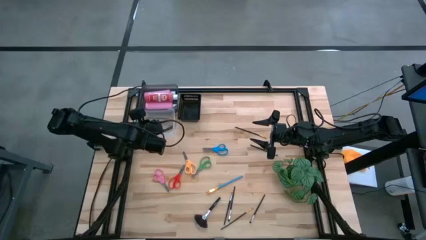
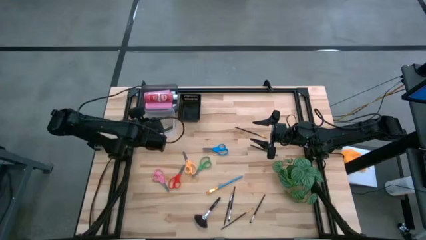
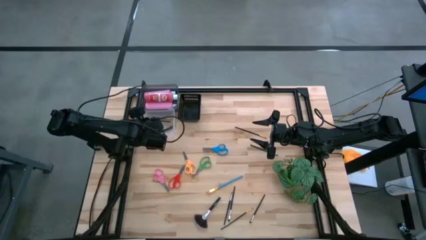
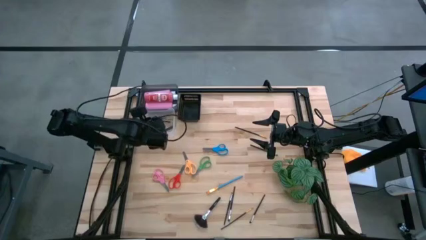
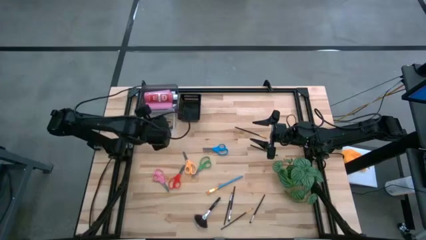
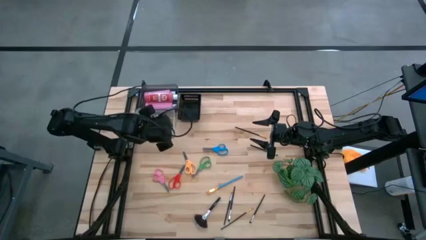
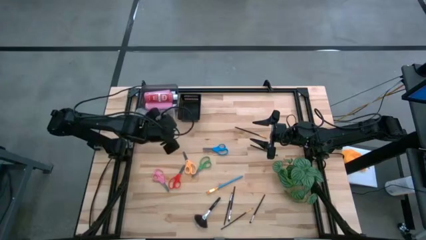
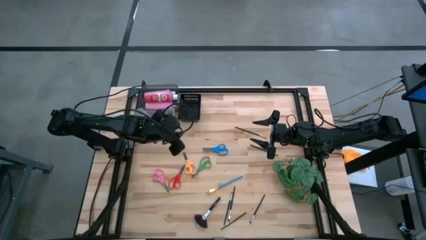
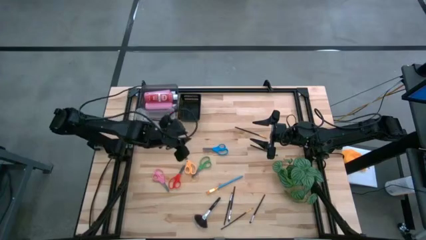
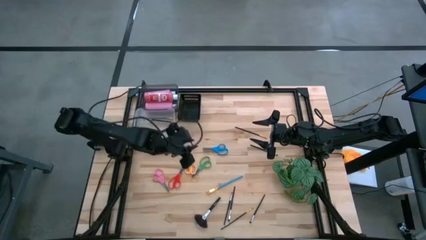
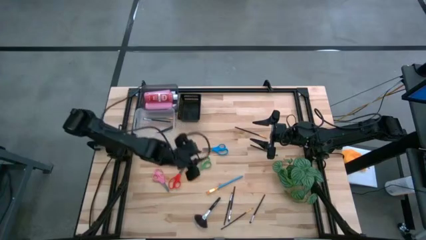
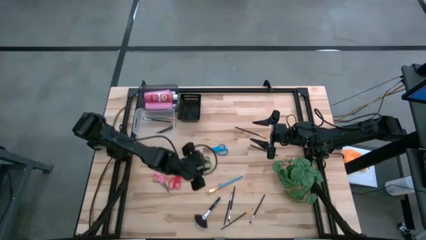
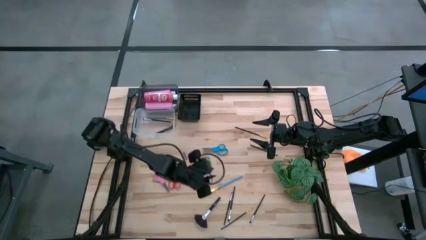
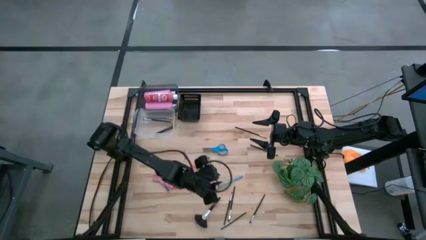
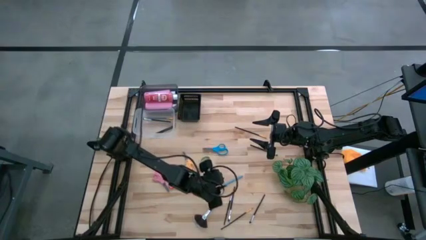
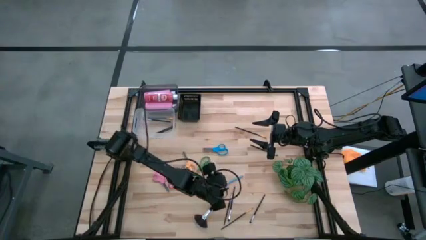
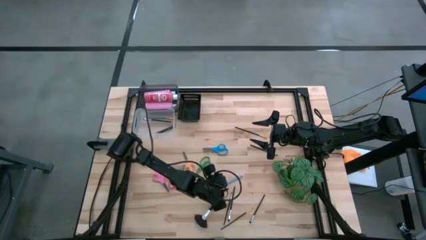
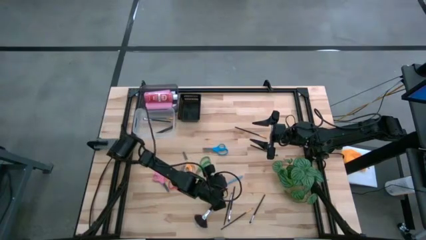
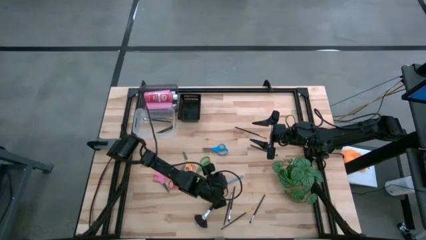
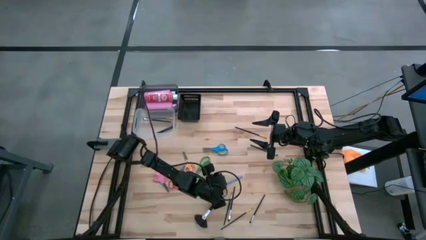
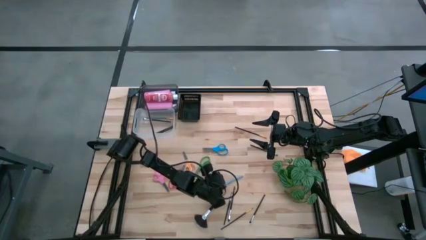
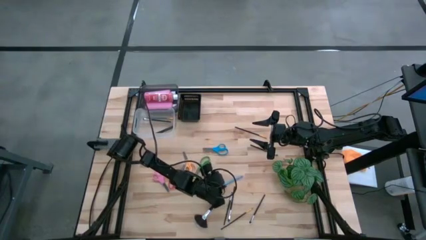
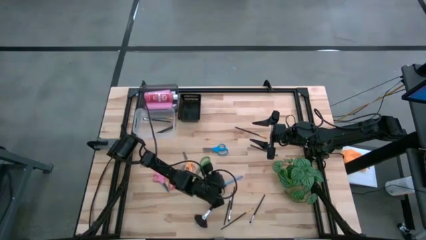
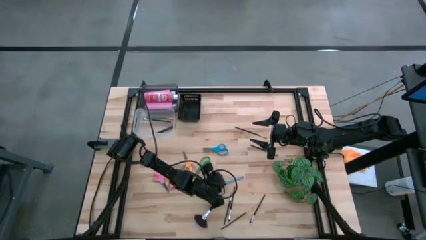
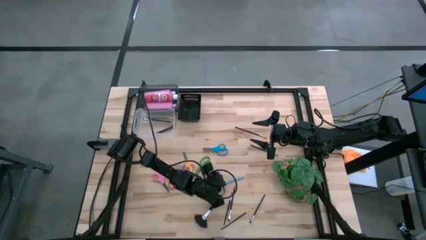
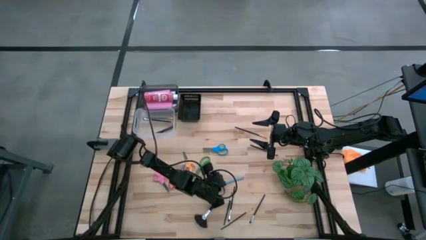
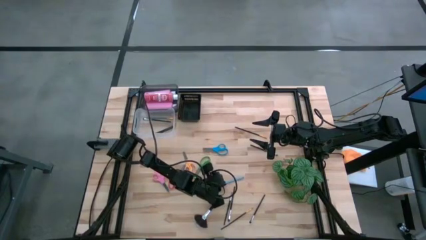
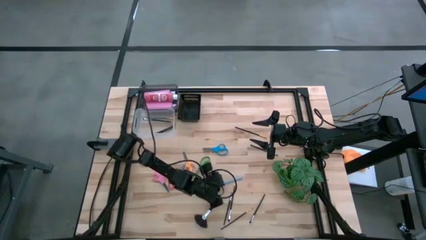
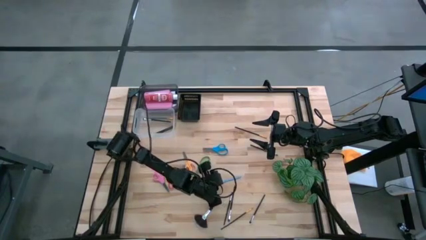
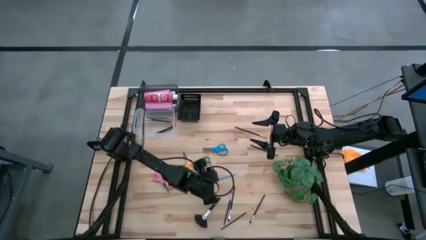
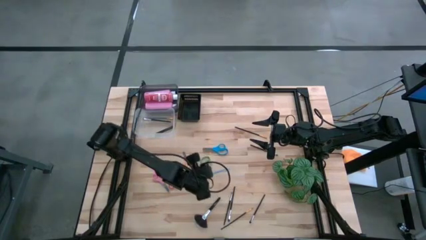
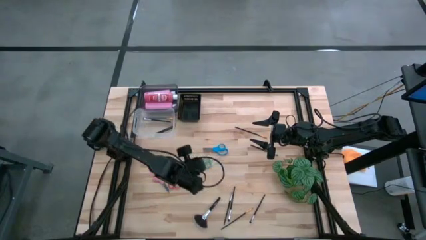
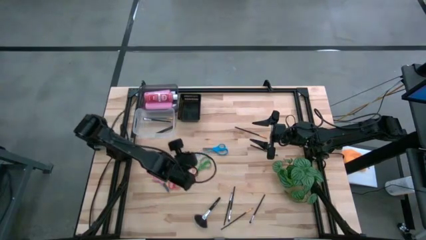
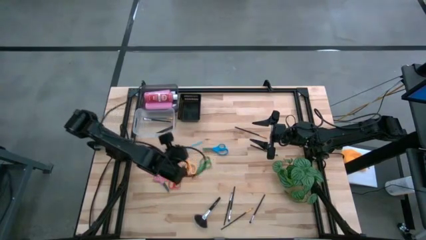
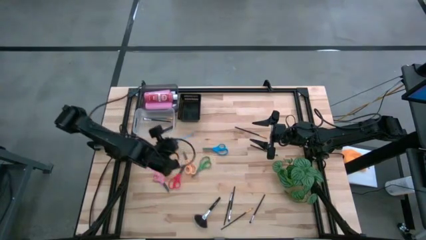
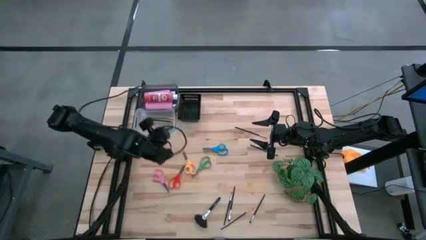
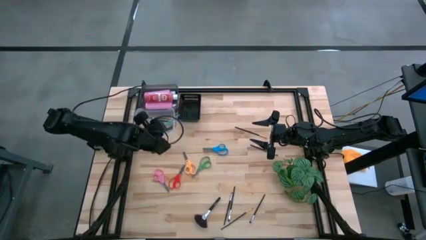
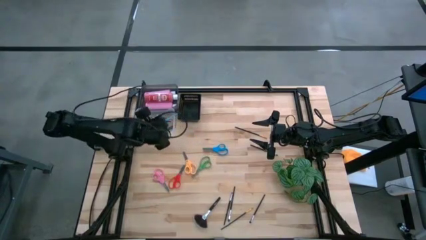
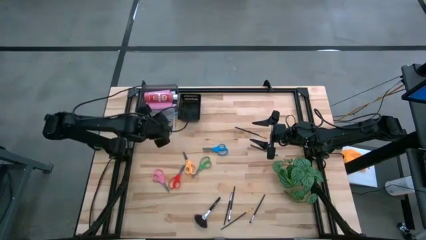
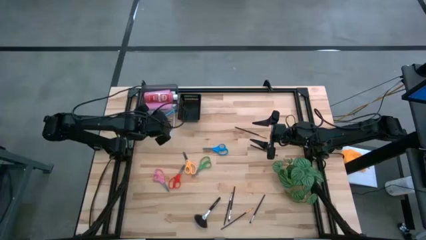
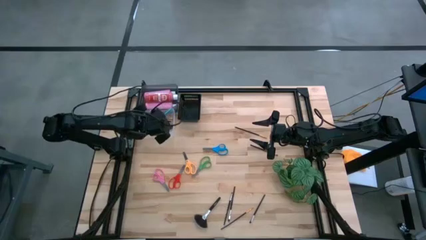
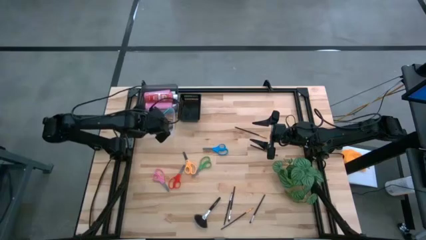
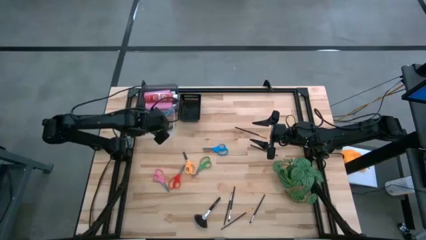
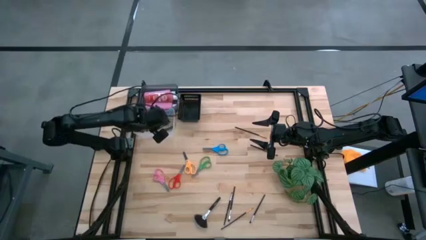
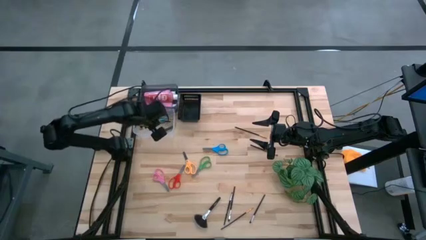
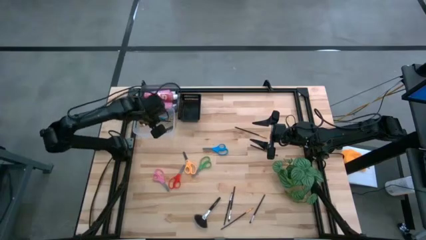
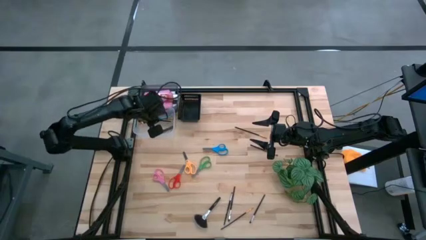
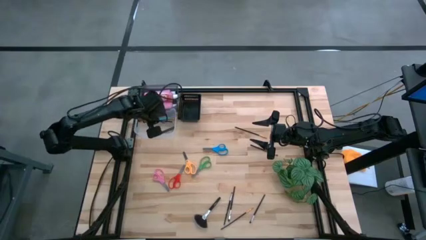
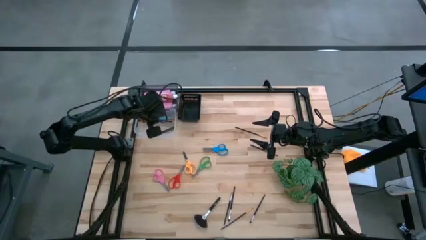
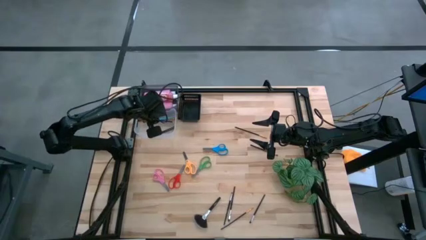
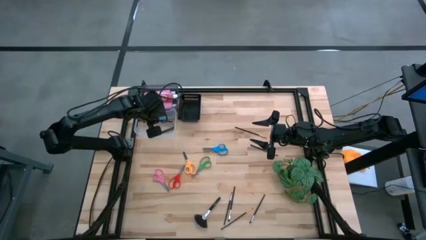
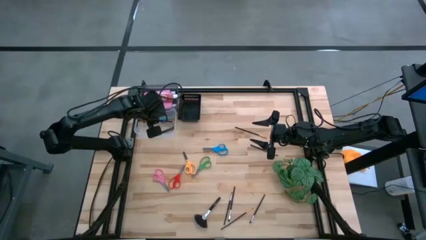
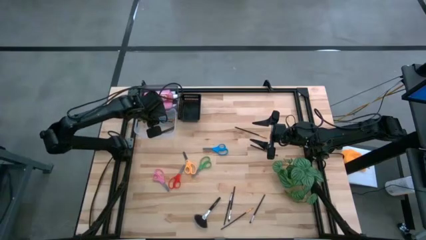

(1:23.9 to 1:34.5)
Task: Pick & Place Paint Supplies
Put the blue paint brush into the transparent bin

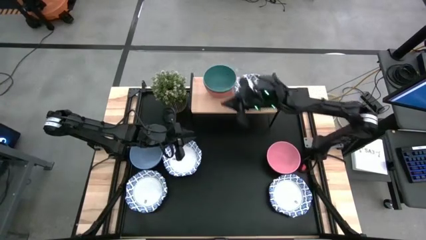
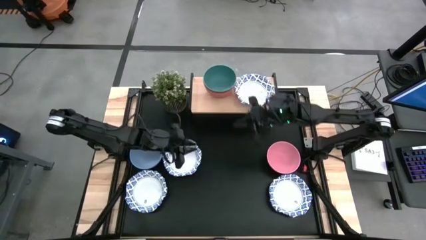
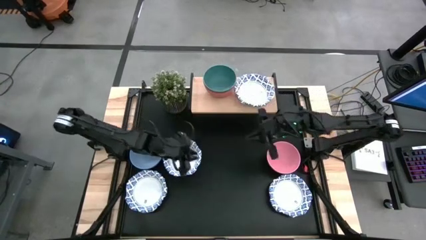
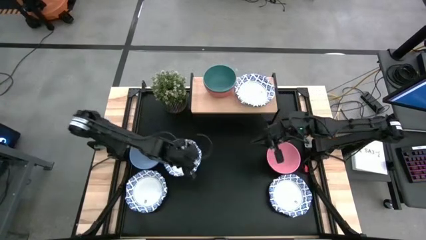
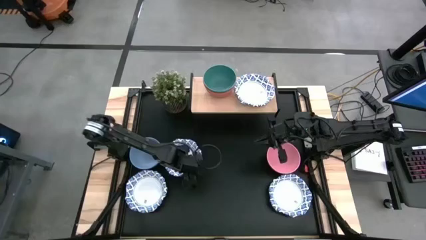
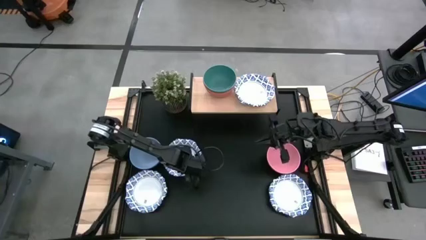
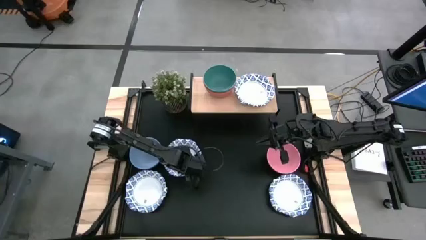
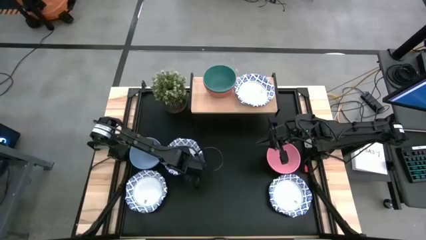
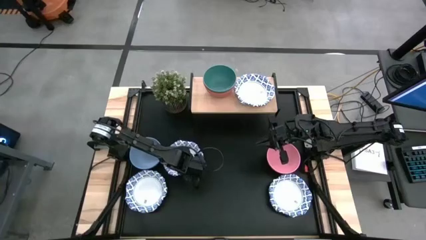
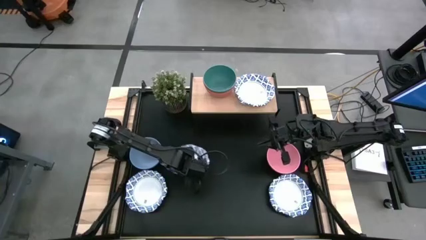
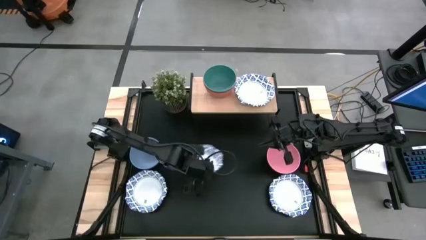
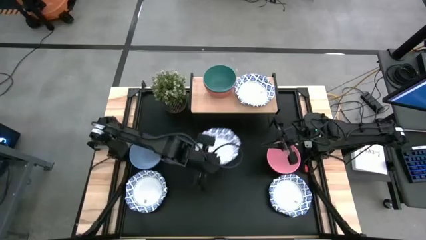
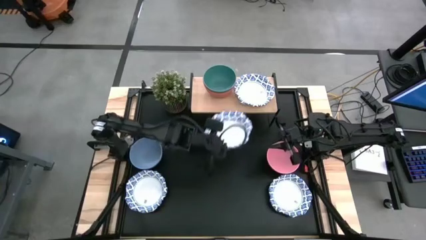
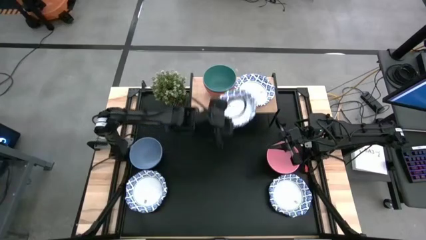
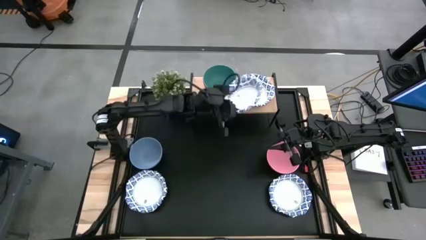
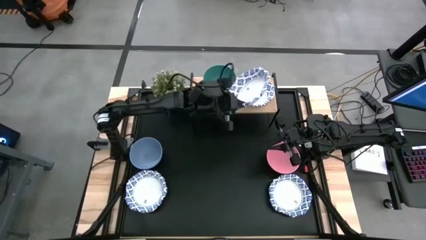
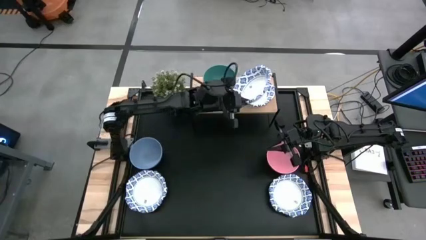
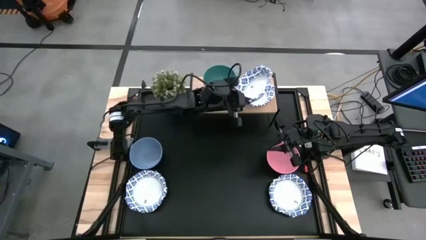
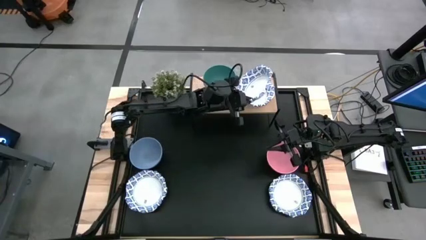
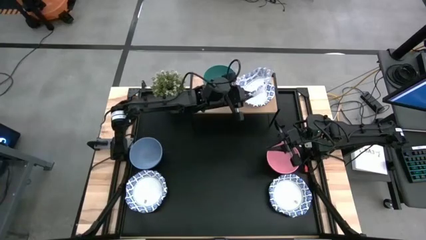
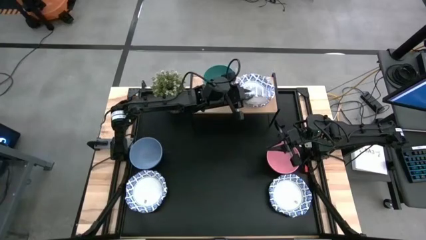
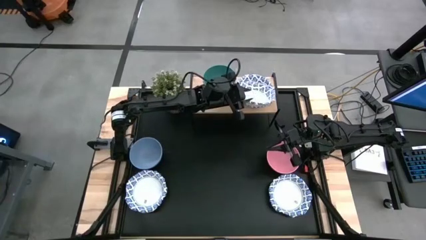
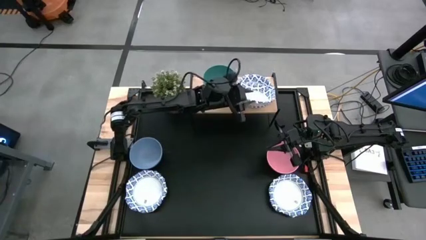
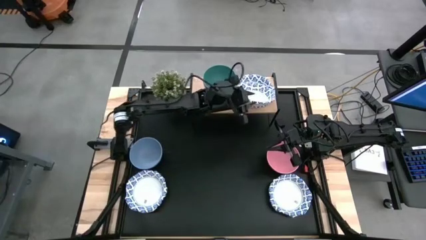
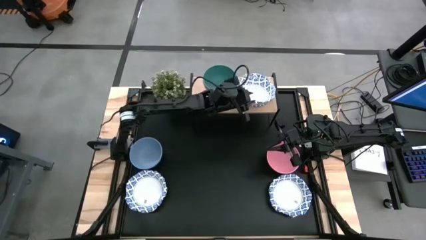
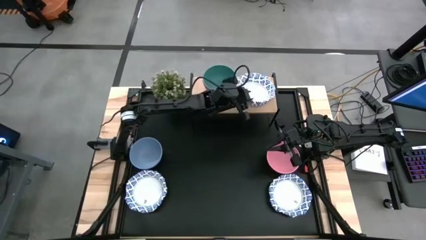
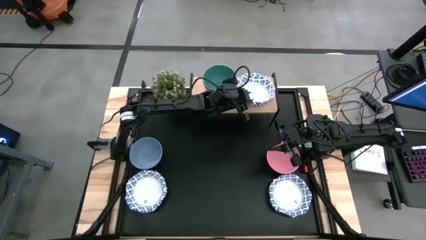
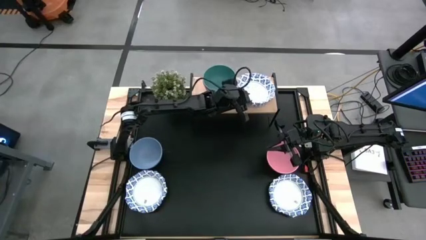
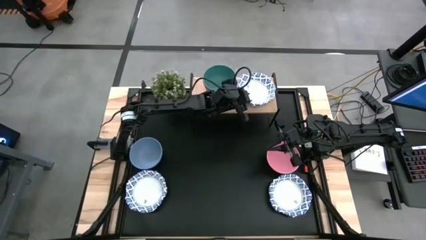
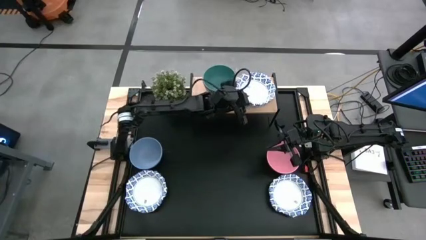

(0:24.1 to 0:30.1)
Task: Place and stack bowls onto a shelf
Stack the white patterned bowl on top of the white patterned bowl on the shelf
